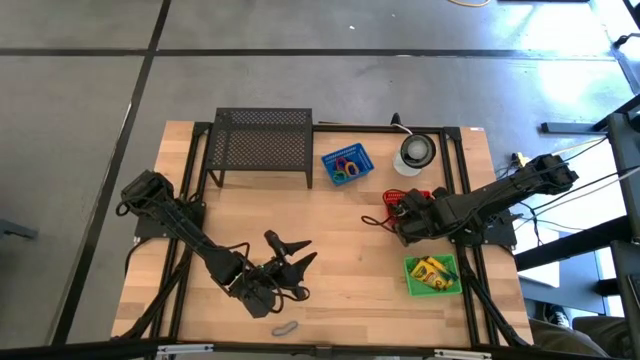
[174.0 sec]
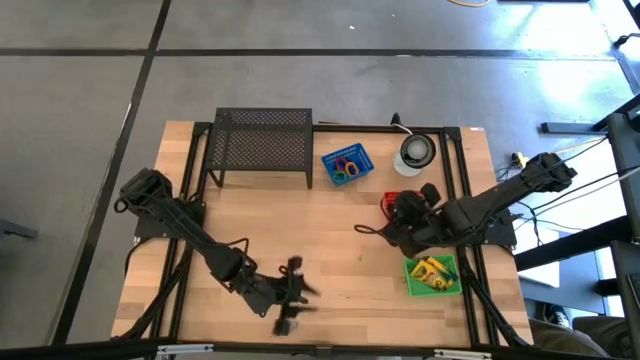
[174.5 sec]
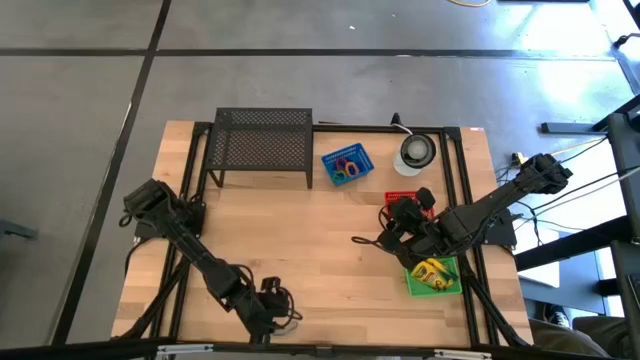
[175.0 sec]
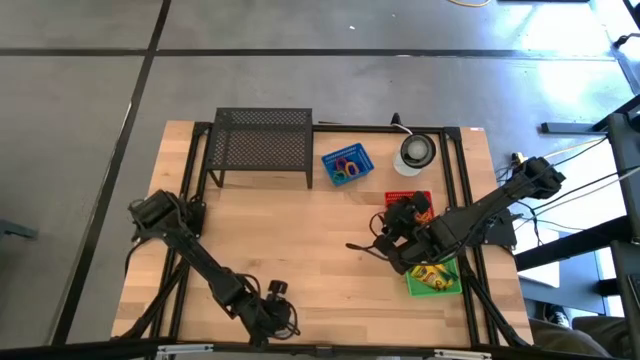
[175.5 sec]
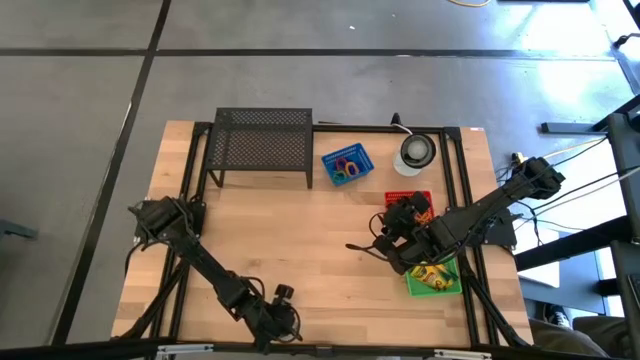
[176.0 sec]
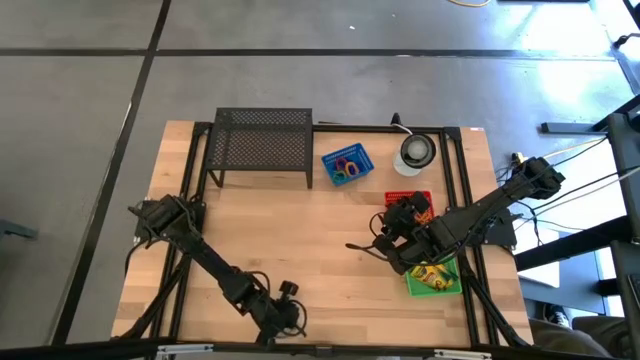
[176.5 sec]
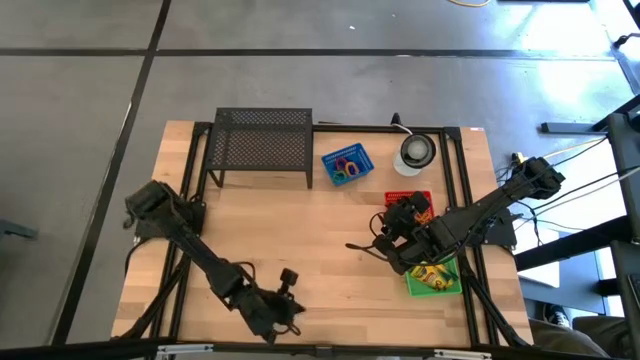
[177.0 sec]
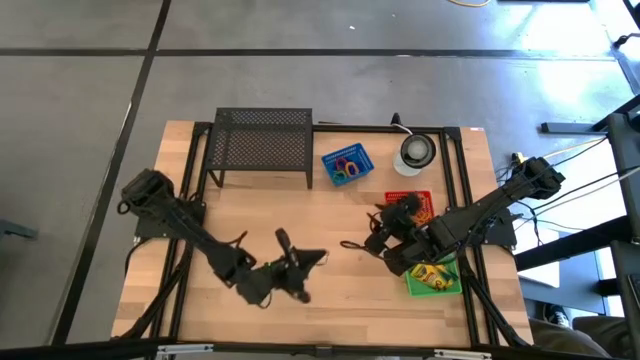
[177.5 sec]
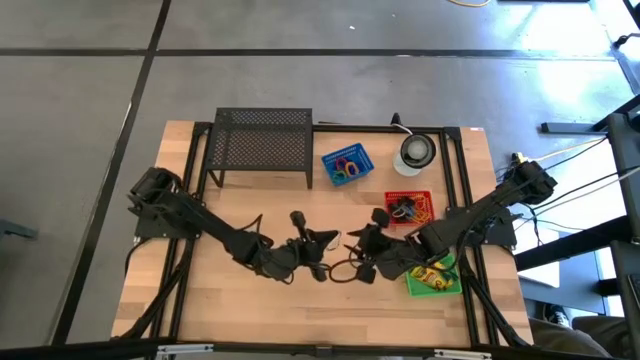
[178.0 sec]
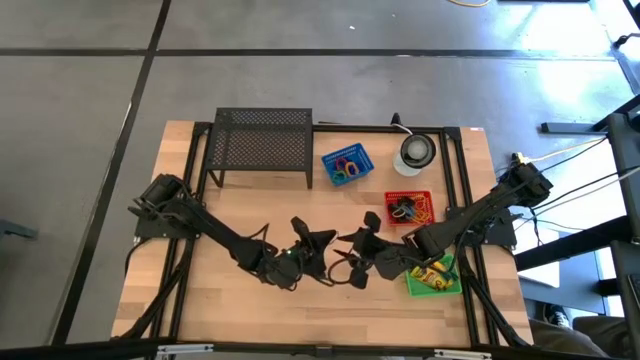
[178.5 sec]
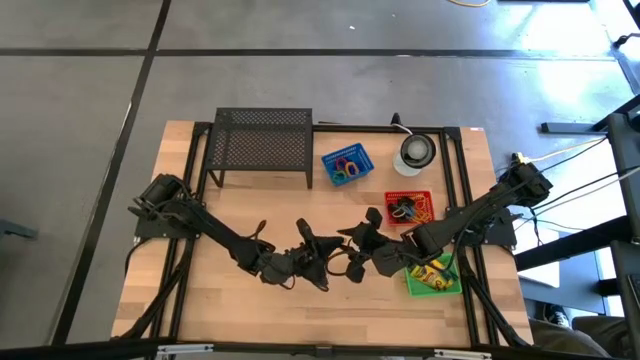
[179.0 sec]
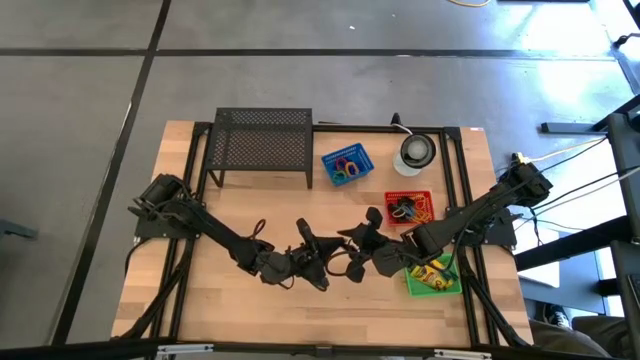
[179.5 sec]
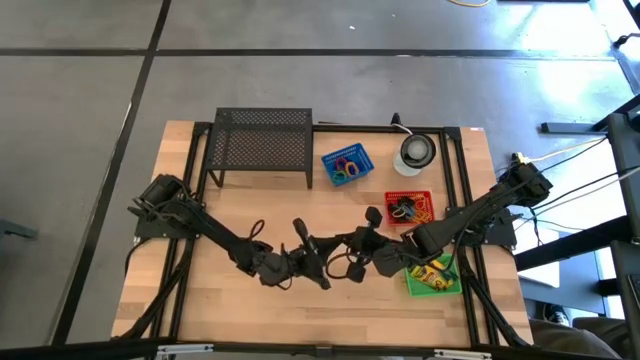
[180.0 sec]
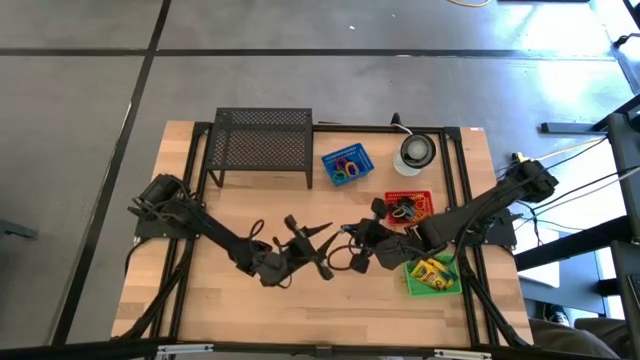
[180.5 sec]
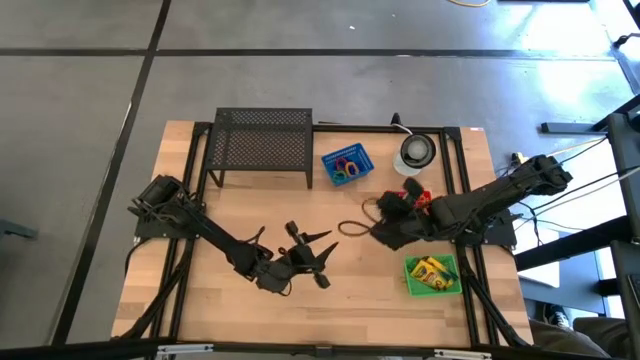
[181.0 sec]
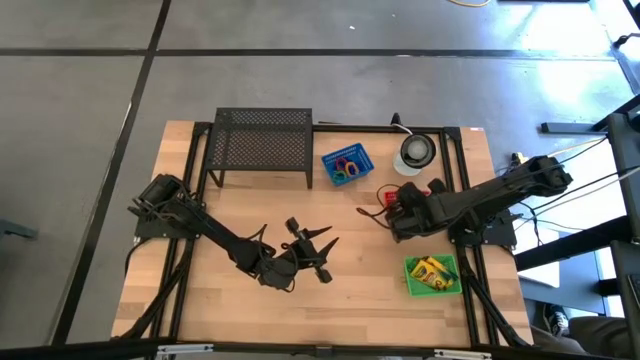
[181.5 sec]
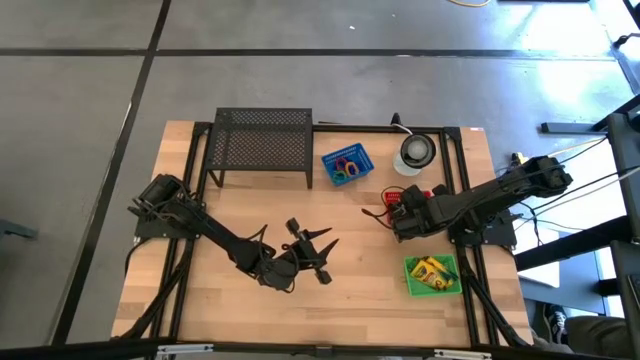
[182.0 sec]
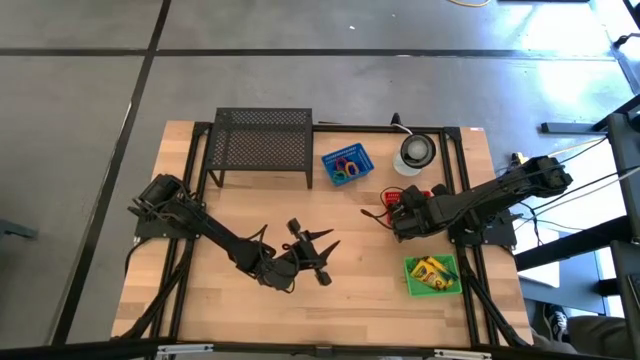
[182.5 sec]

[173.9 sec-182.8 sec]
Task: Pick & Place Office Desk Supplies
Put the blue rubber band into the red bin

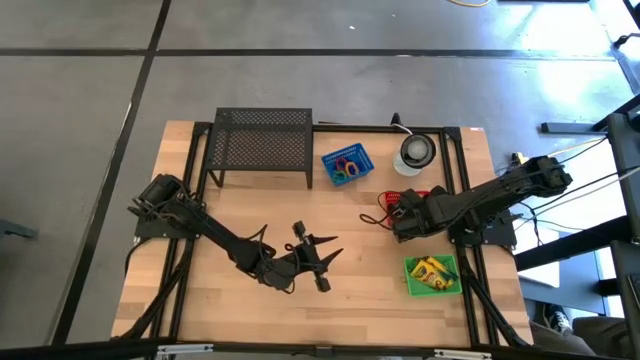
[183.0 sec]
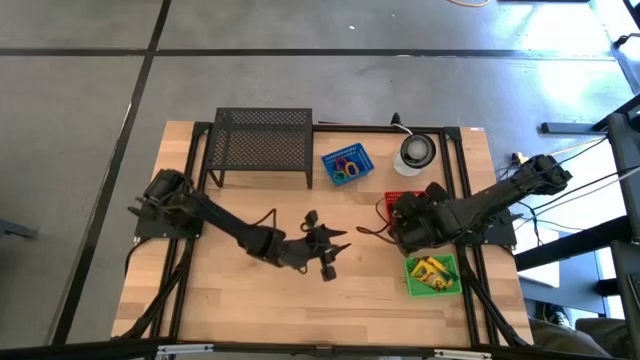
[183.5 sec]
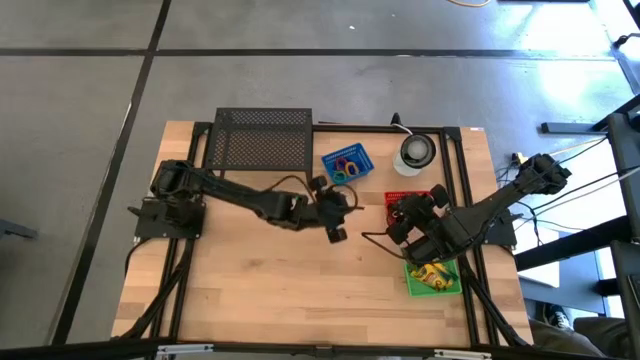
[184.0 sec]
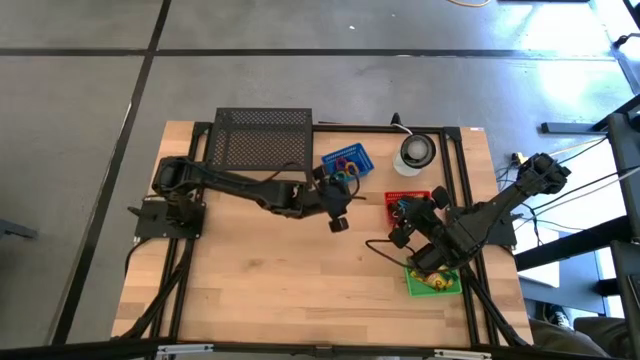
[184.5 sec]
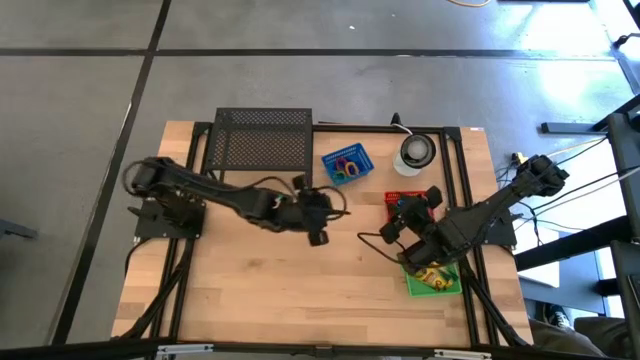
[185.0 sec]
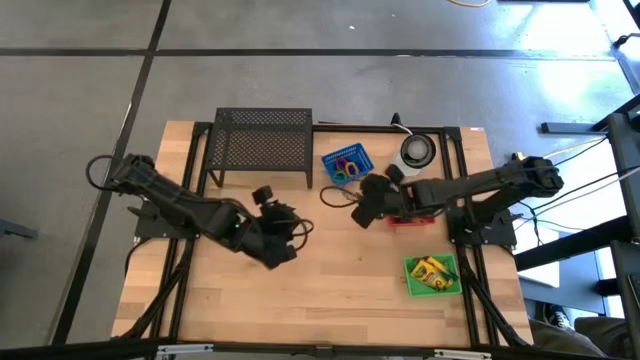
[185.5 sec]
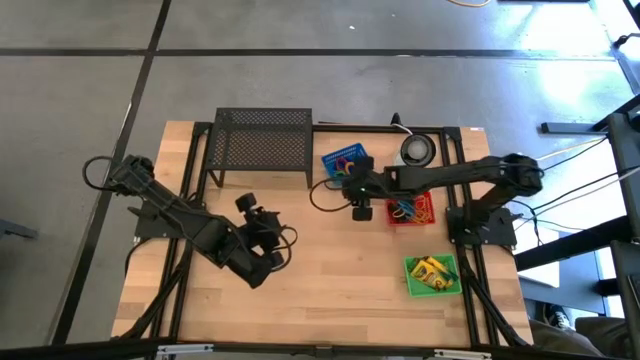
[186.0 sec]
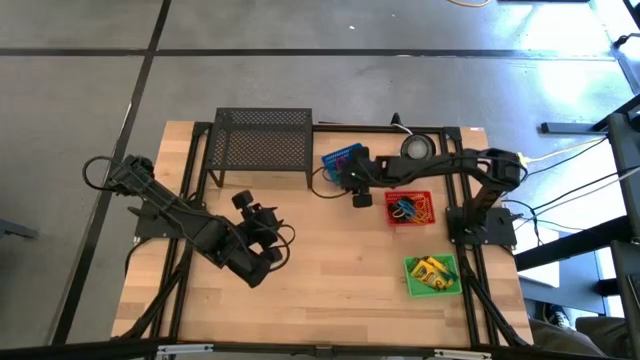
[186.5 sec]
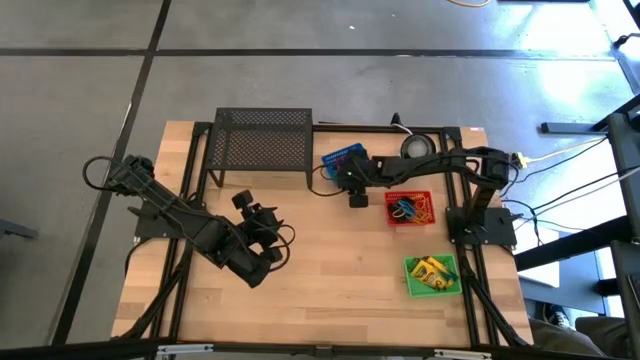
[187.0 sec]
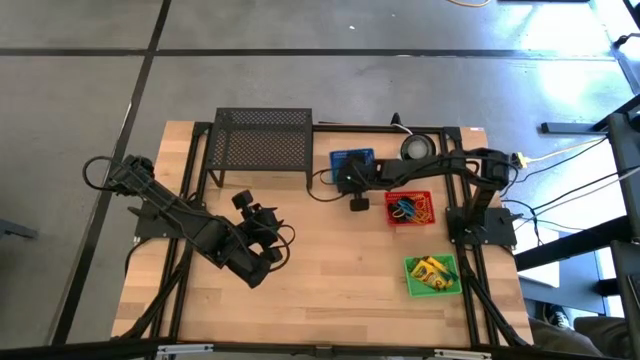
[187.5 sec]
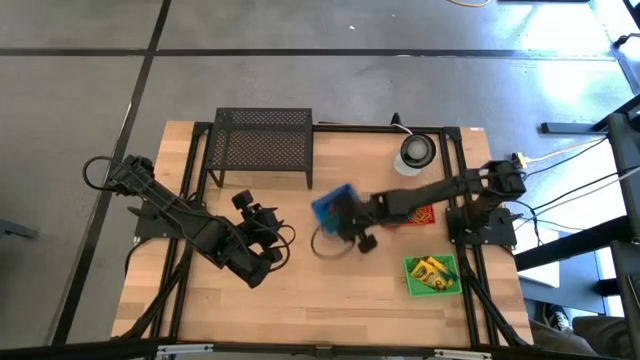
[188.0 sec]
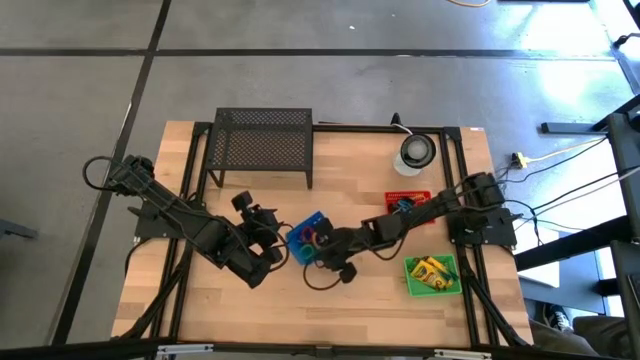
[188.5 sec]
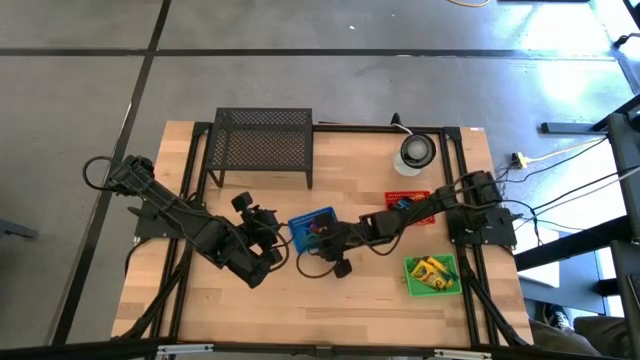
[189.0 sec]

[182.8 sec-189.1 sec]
Move the blue bin with wrist bands to the middle of the table

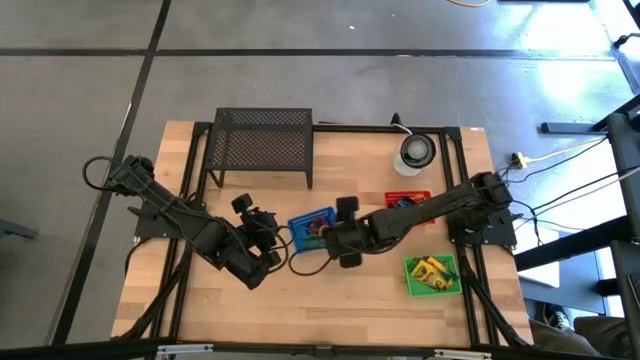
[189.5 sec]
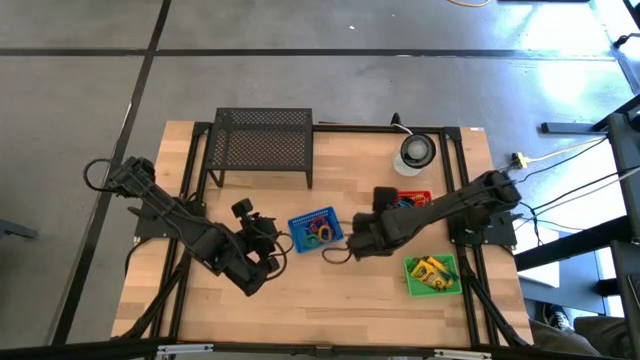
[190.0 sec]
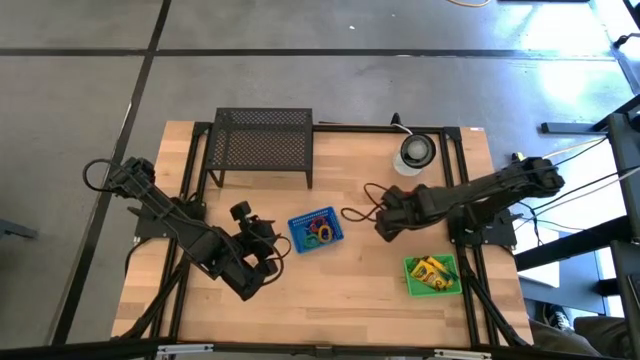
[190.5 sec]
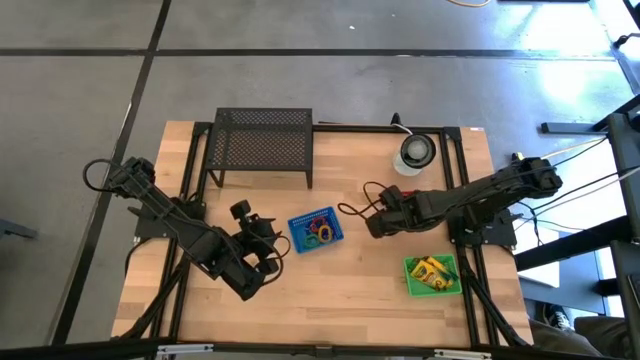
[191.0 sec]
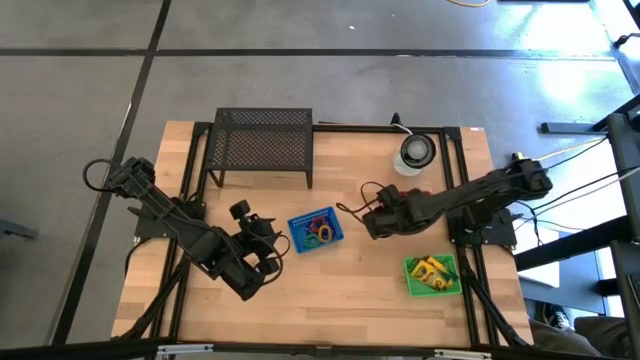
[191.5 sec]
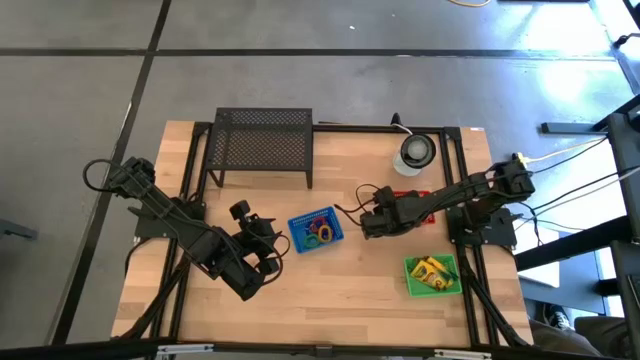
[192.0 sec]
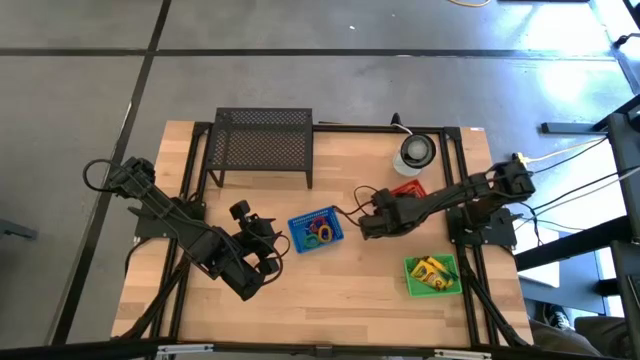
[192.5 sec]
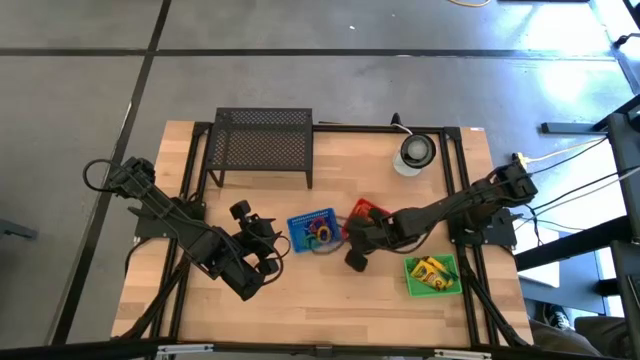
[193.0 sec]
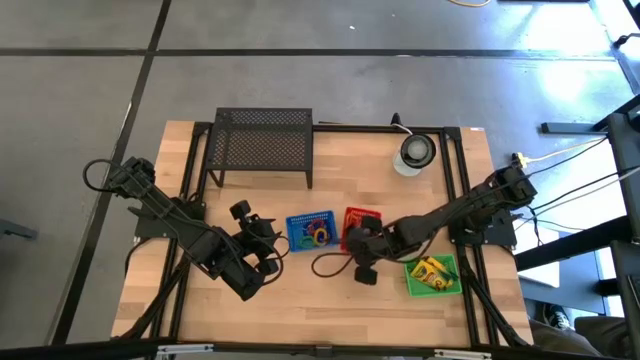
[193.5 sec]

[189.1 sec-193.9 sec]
Move the red bin with rubber bands to the middle of the table
